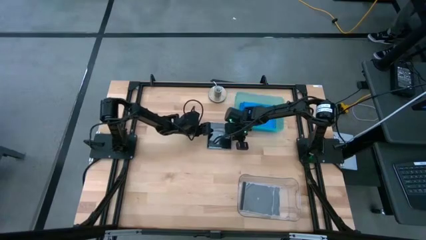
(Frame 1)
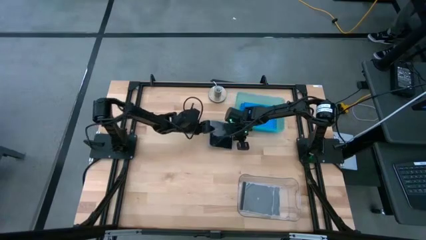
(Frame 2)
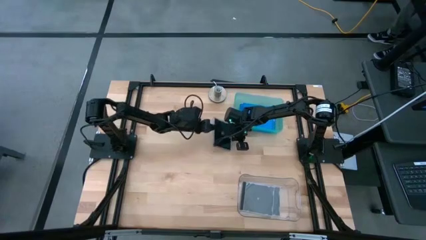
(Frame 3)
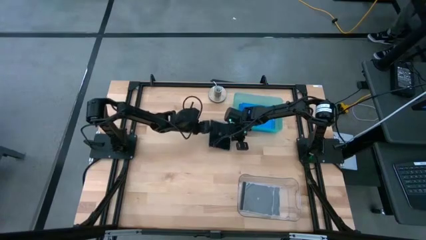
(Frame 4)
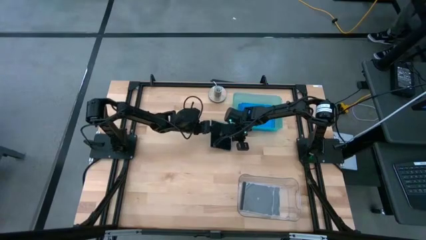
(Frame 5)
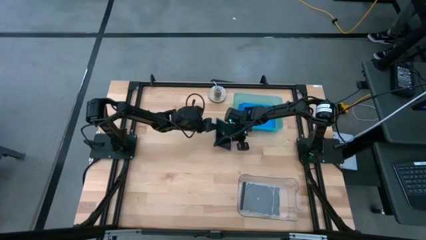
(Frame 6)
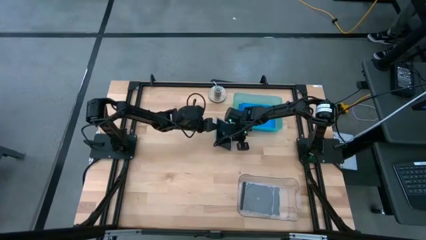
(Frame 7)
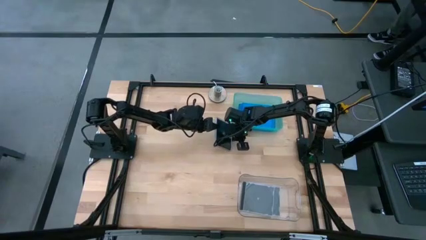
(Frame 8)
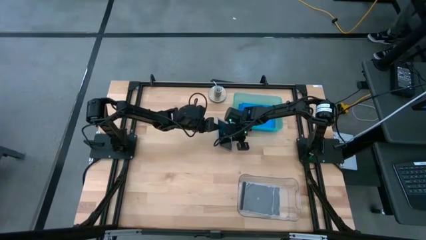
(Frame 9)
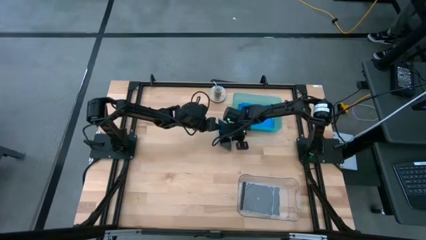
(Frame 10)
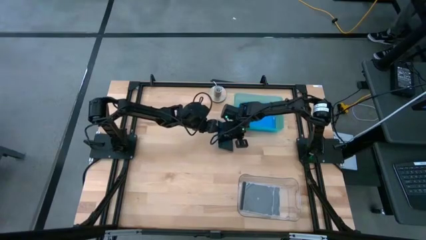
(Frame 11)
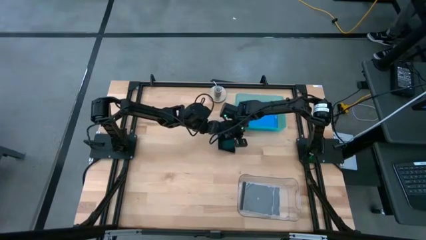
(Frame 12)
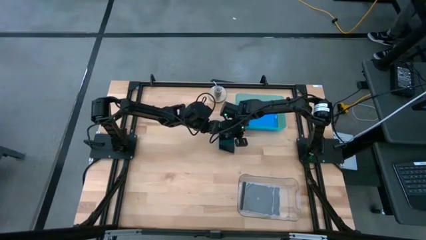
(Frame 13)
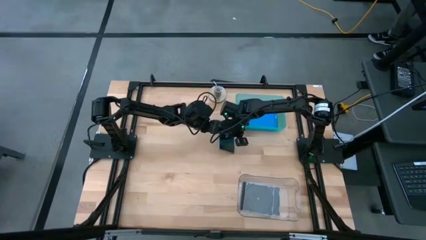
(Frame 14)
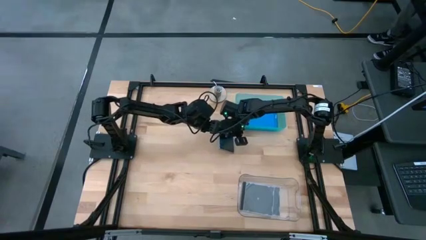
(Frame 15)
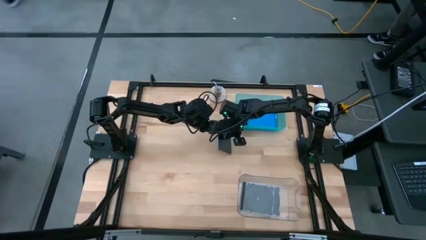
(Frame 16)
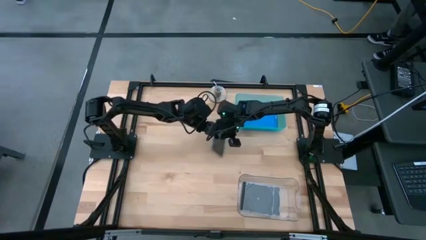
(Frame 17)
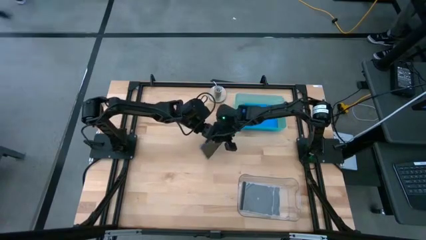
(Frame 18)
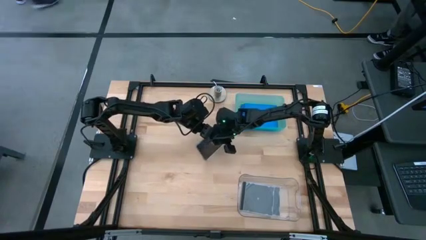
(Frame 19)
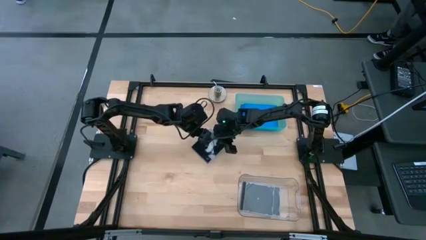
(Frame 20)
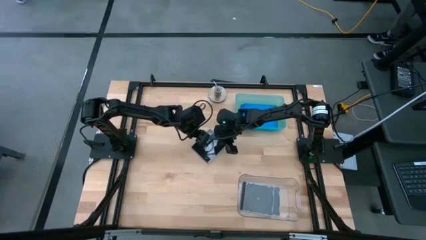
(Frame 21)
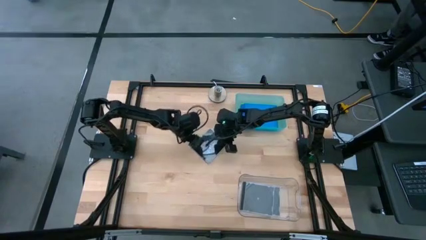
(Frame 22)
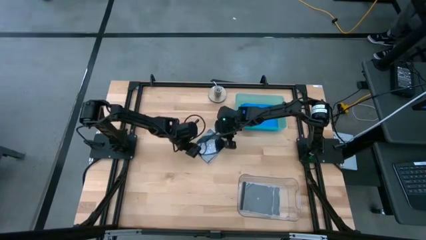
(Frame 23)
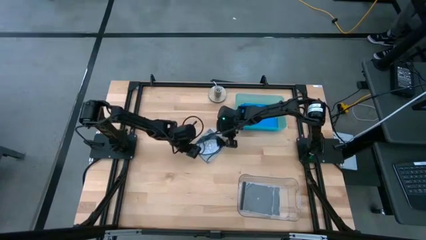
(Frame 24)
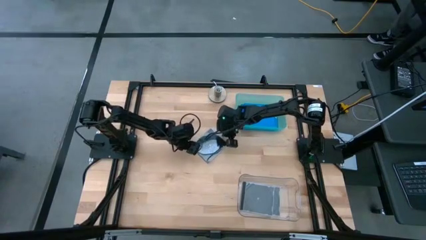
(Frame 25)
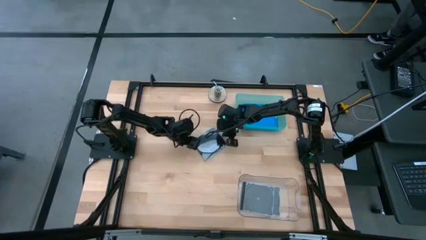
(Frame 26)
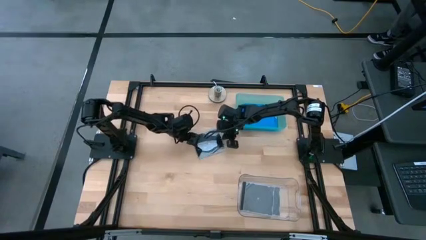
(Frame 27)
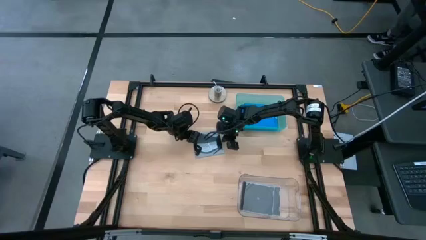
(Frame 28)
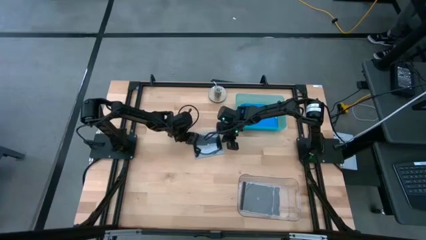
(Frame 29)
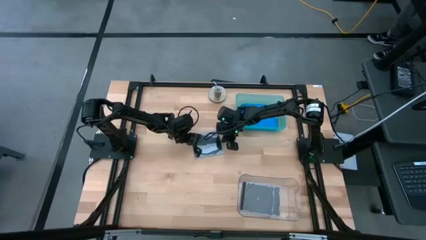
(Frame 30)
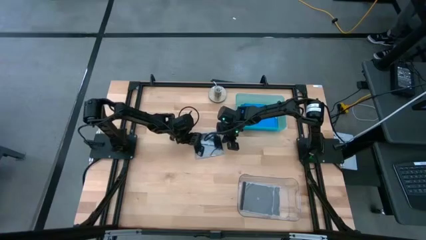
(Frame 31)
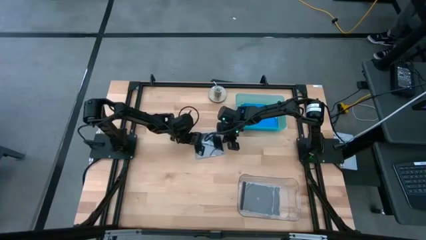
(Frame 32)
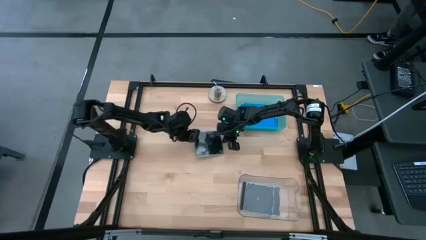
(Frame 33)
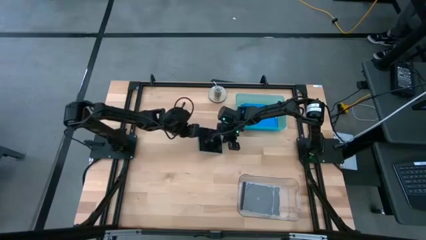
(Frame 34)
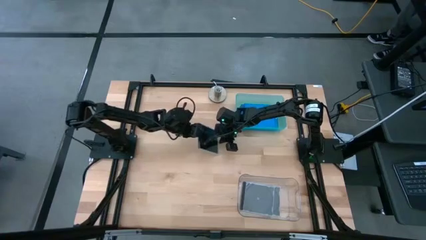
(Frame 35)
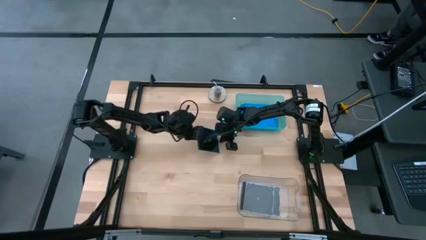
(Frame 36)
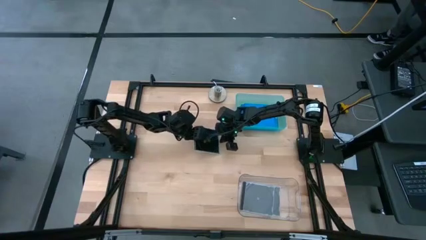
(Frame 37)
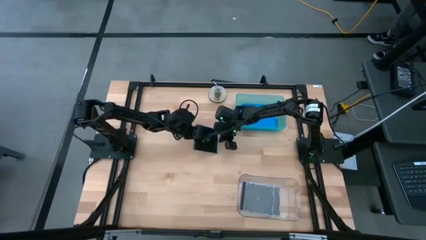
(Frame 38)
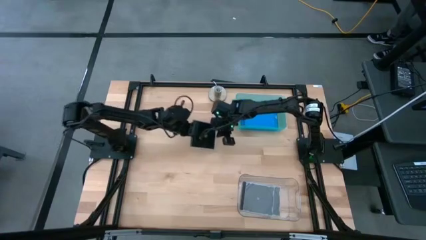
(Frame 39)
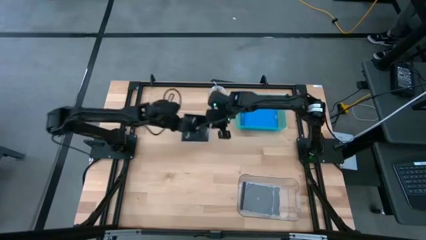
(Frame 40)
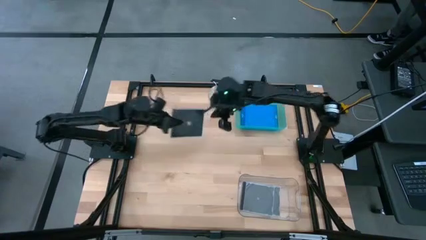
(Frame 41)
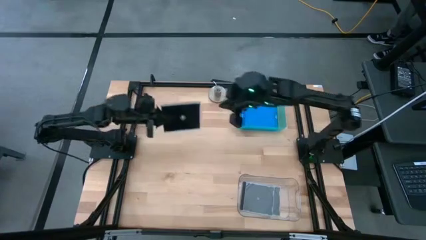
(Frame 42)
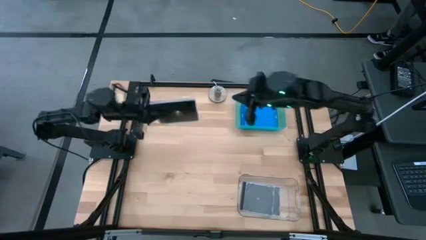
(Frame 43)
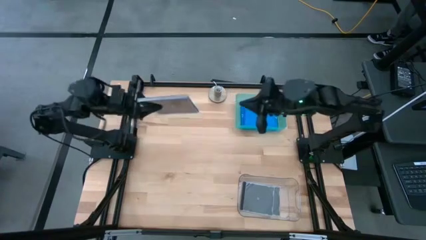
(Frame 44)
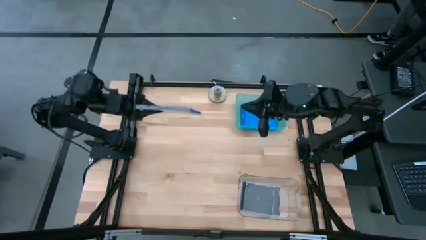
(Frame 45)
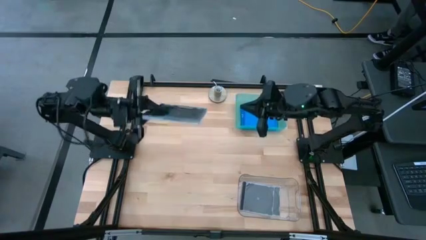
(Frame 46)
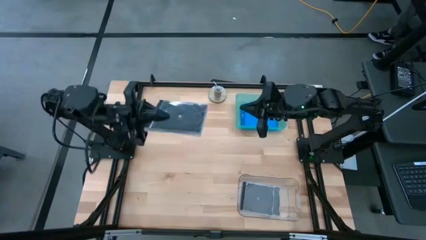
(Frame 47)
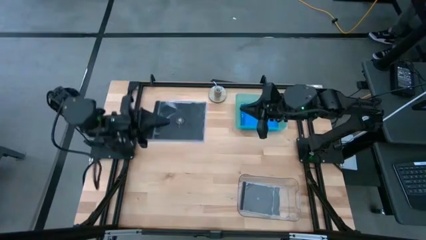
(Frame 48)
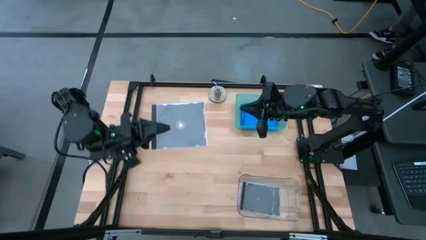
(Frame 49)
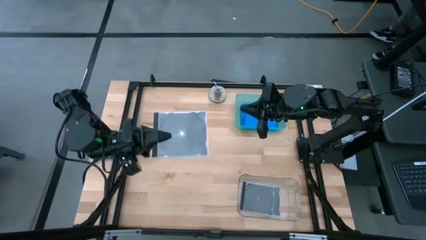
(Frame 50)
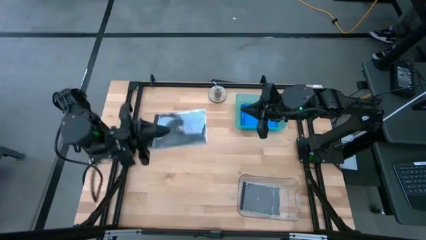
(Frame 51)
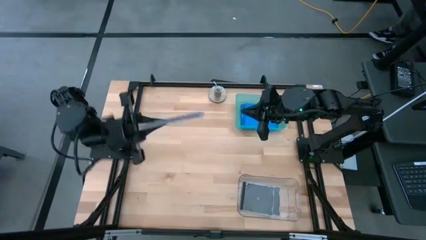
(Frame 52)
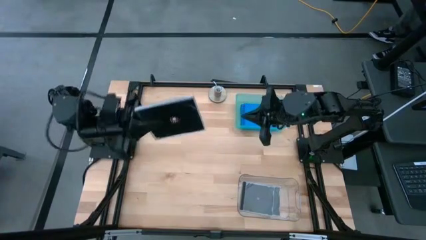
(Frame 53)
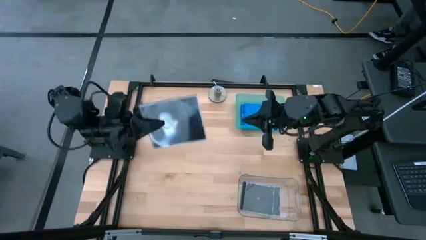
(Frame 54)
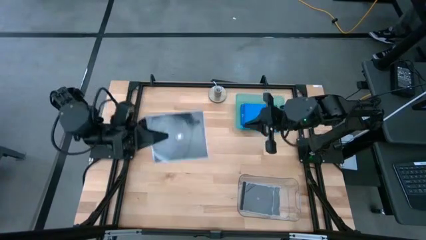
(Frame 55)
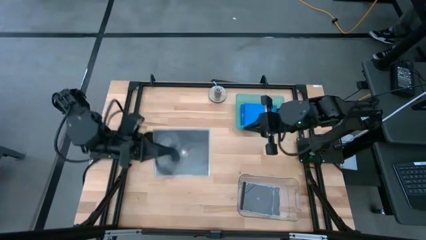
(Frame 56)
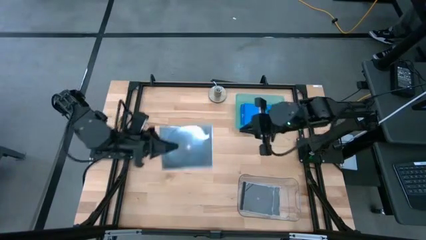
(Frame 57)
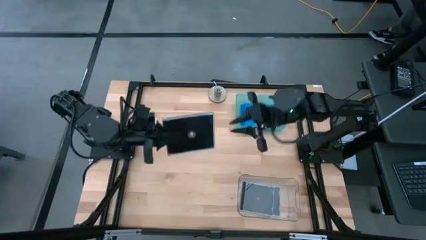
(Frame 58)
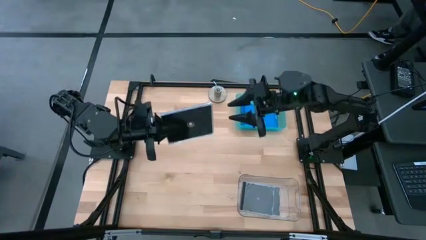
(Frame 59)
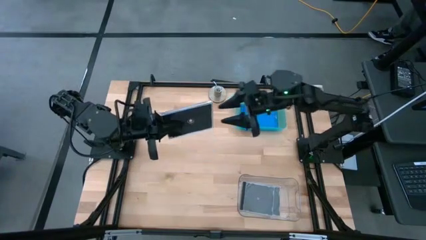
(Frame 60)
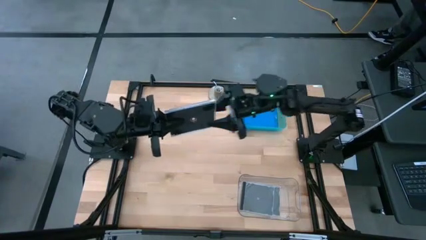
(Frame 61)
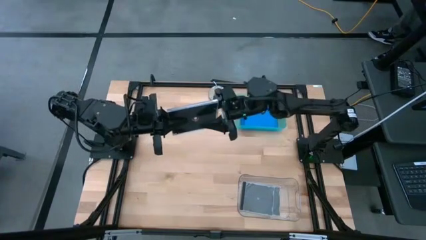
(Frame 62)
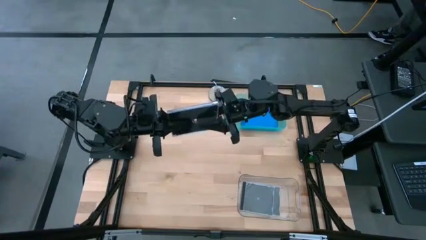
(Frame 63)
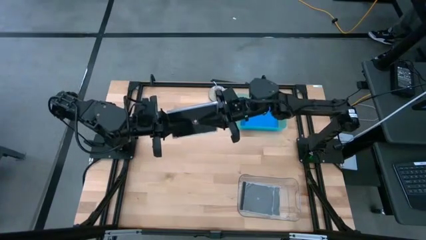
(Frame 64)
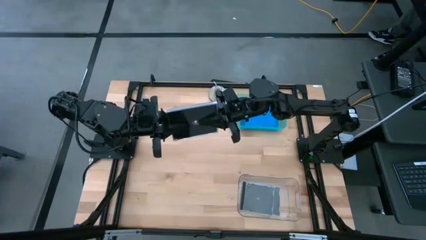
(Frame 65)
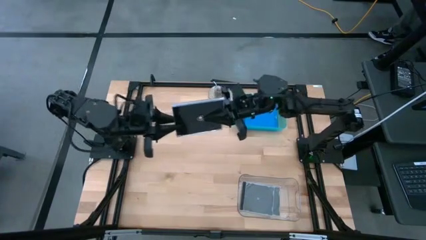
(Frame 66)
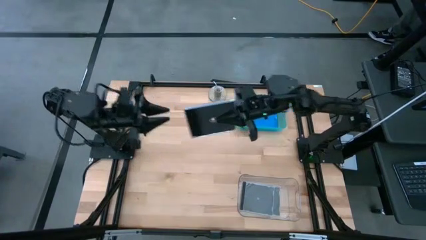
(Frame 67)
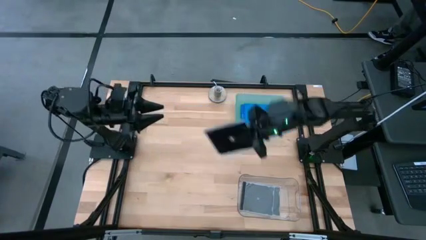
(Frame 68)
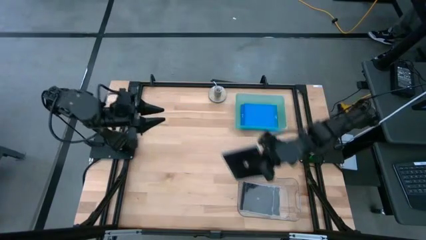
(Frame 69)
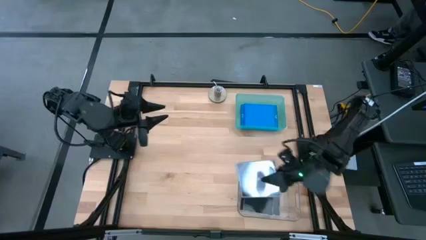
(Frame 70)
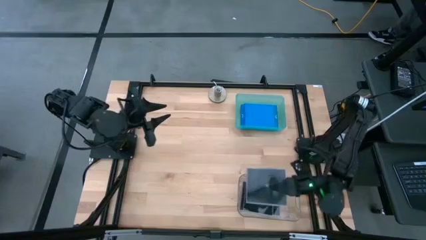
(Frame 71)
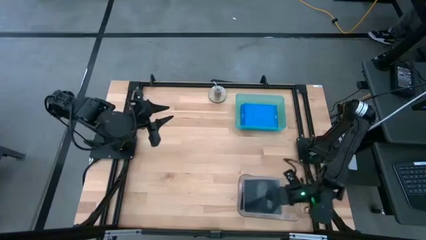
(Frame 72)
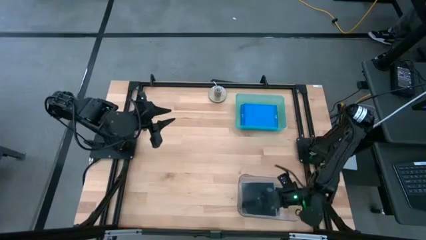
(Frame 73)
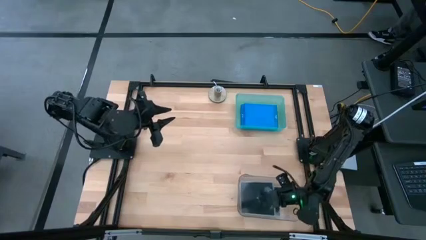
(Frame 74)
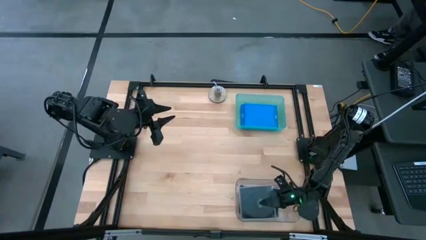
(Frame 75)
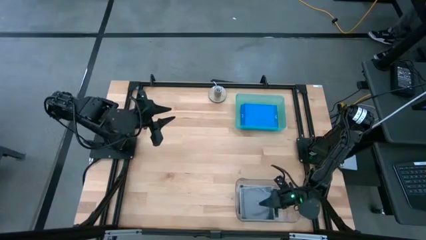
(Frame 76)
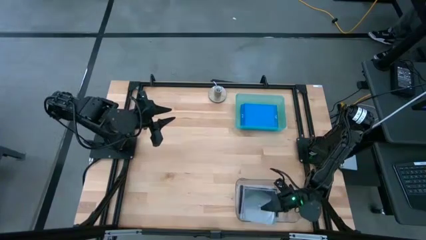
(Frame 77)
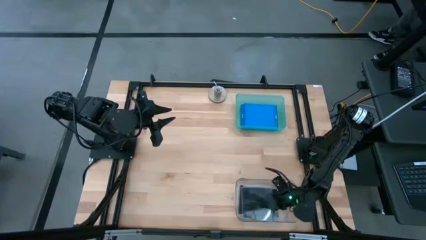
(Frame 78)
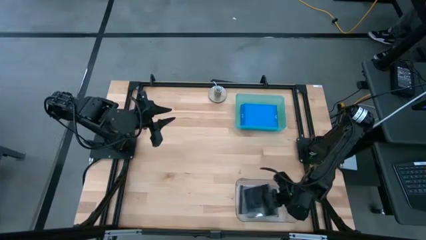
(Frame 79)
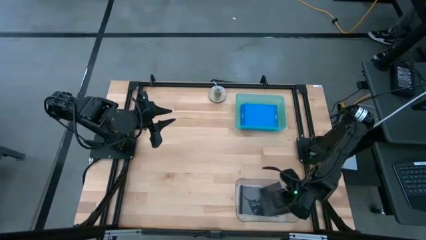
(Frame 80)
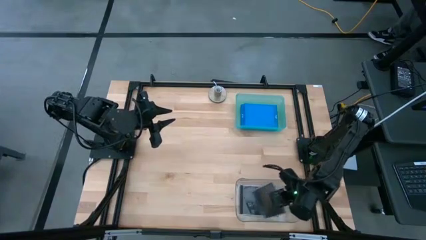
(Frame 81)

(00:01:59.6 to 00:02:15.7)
Task: Pick & place jewel cases by type
Put the black CD case into the transparent bin
